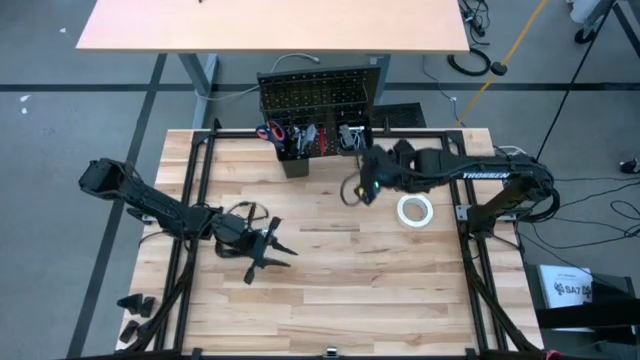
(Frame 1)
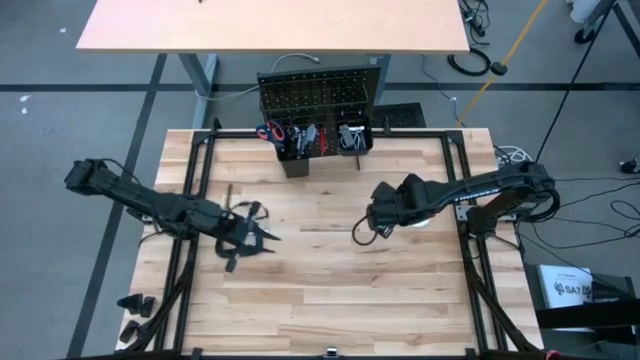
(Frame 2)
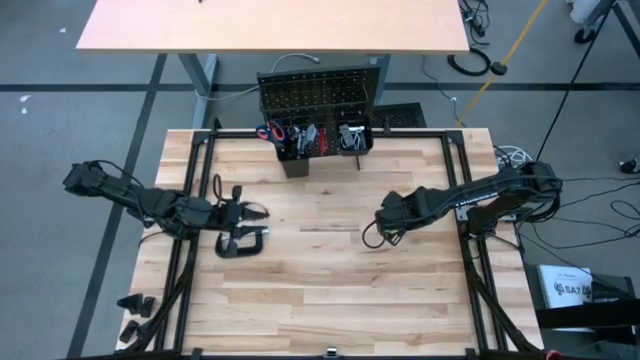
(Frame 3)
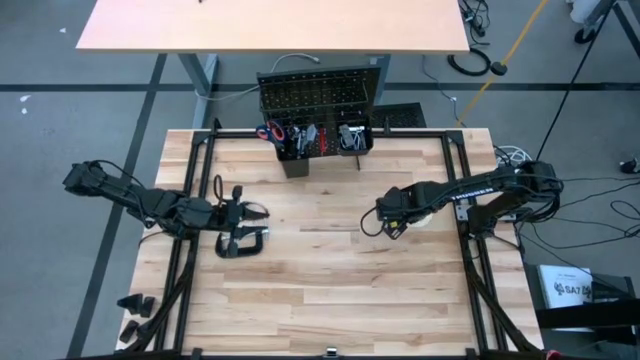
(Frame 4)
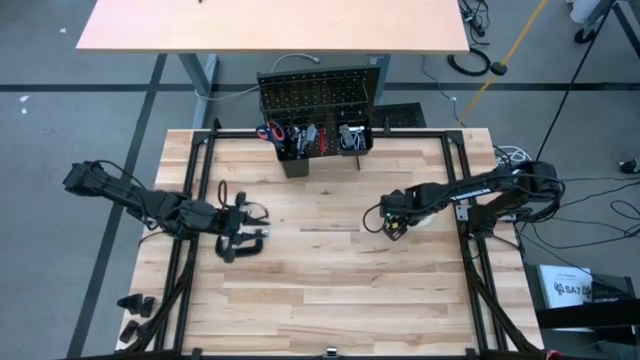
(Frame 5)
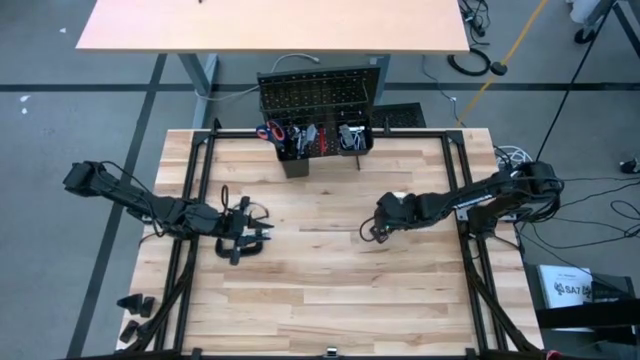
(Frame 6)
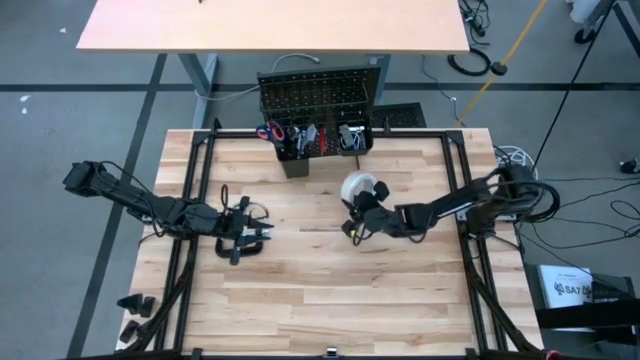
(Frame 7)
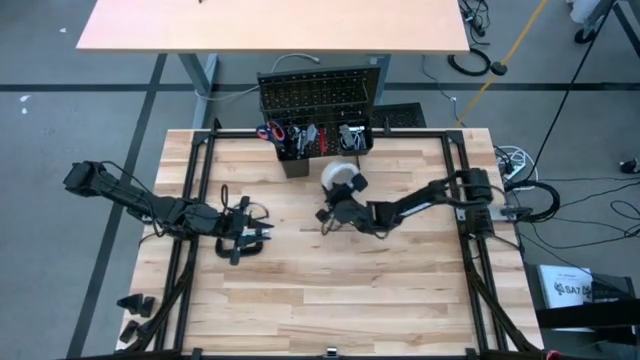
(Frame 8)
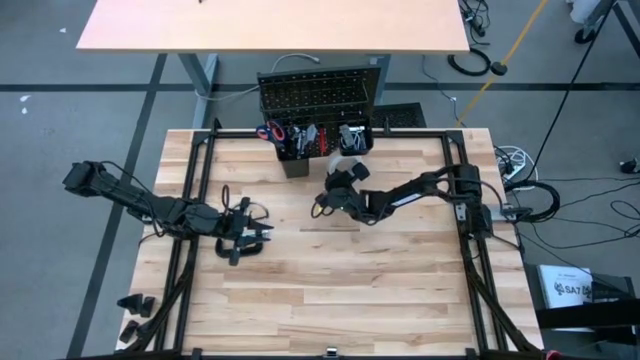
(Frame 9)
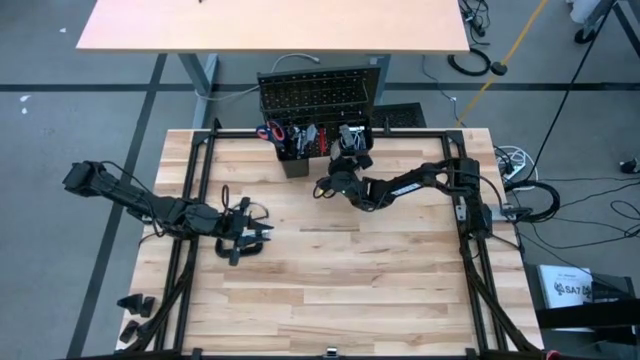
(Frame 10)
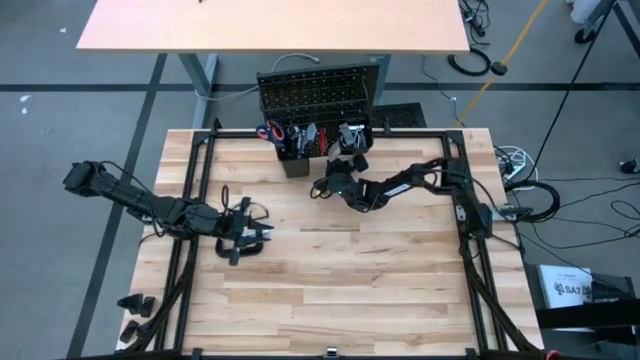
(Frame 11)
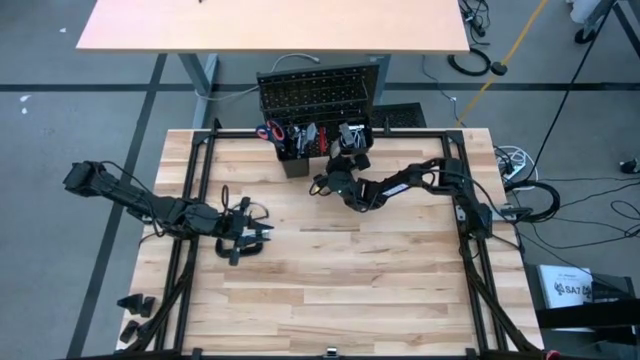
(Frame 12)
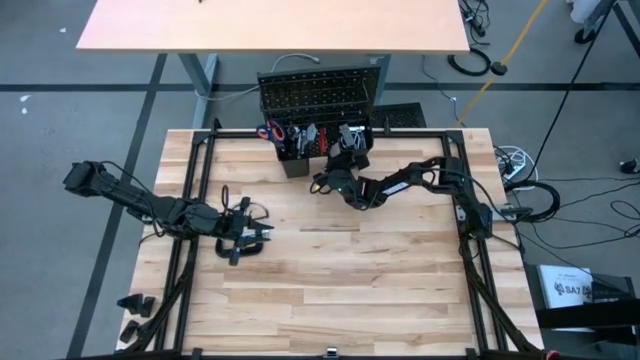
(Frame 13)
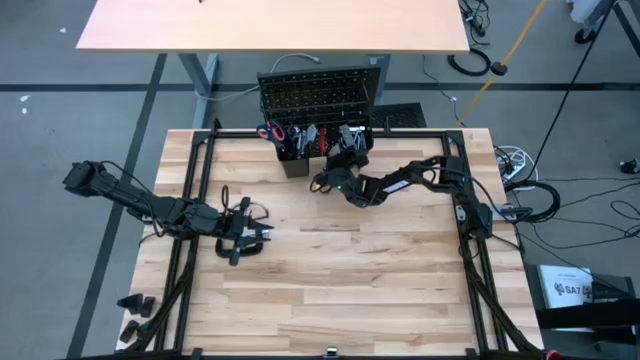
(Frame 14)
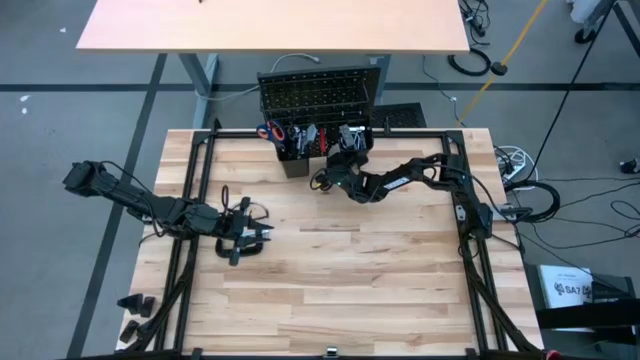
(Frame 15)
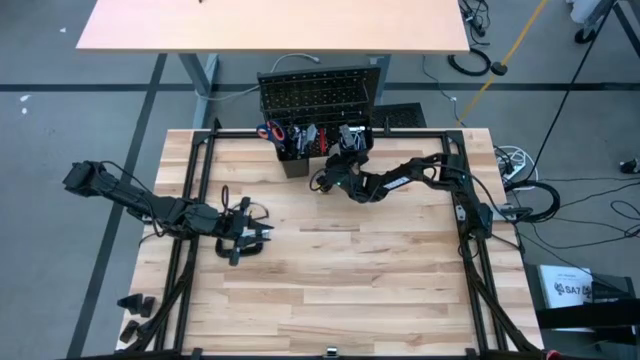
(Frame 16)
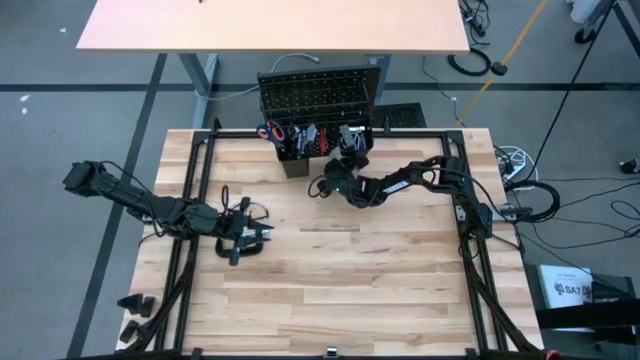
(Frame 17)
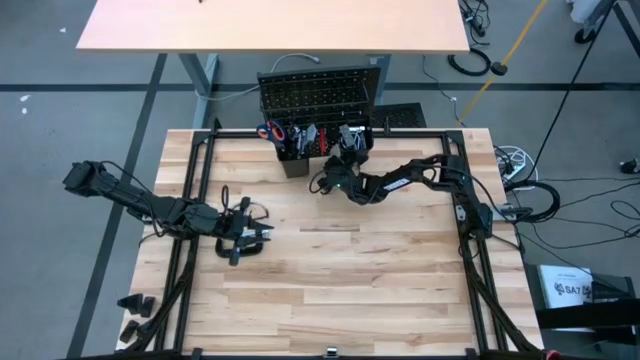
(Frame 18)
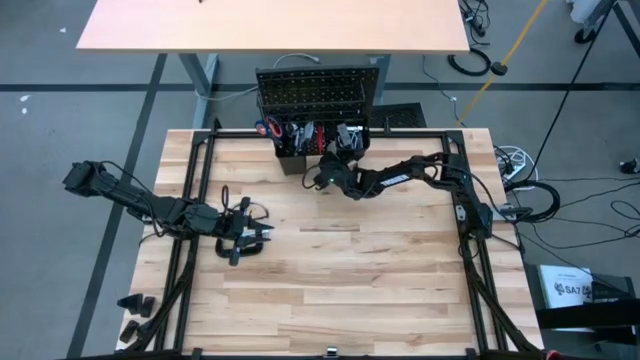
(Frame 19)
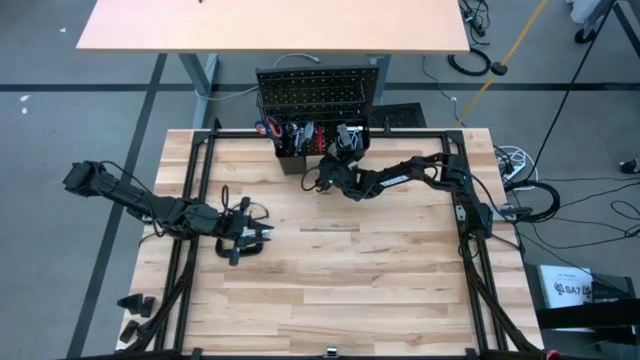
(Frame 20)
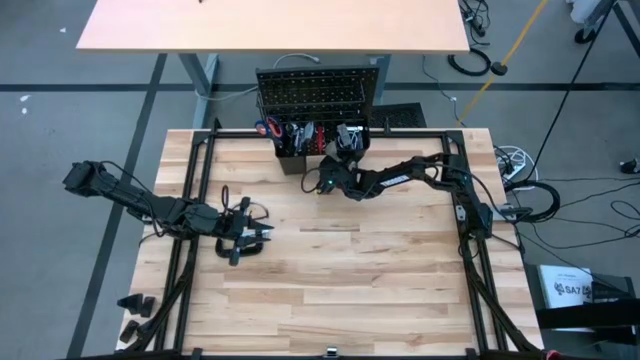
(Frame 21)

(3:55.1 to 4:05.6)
Task: Hang tools onto peg board
Hang the tape on the peg board

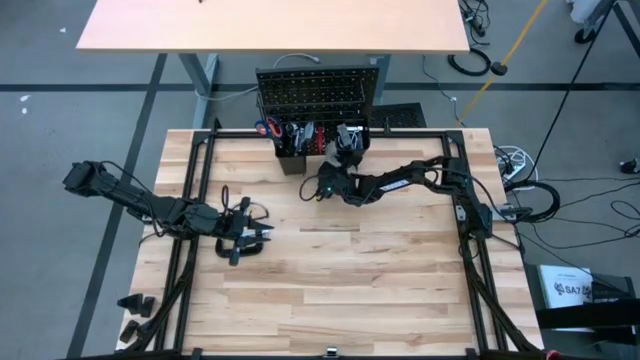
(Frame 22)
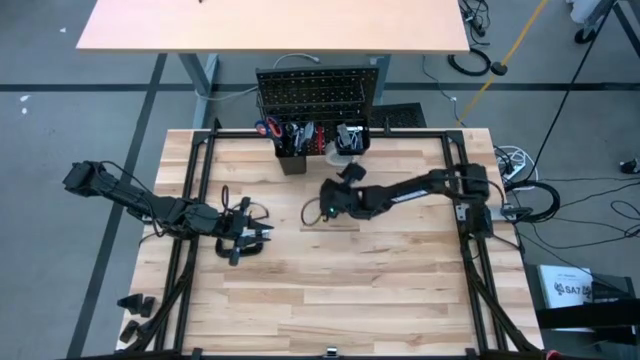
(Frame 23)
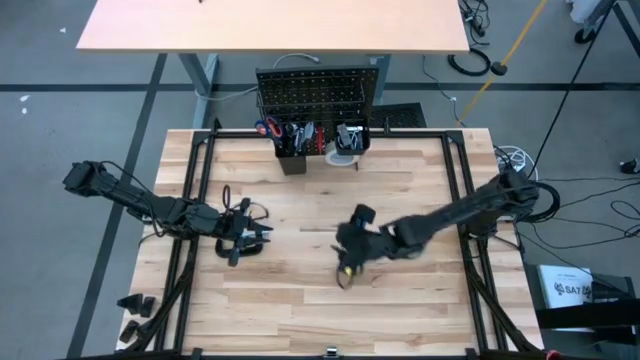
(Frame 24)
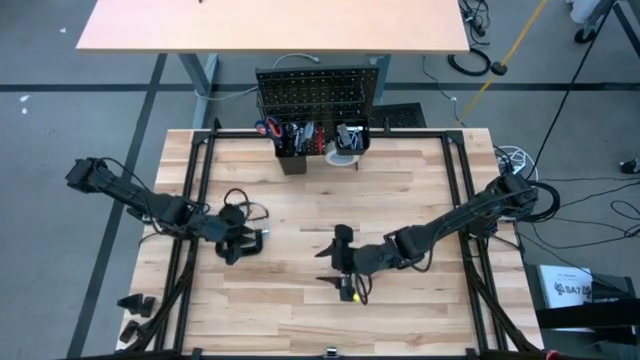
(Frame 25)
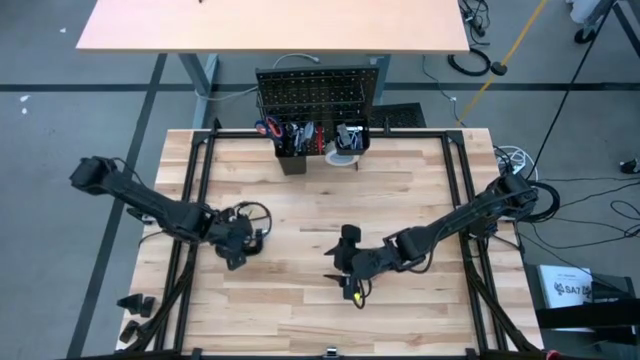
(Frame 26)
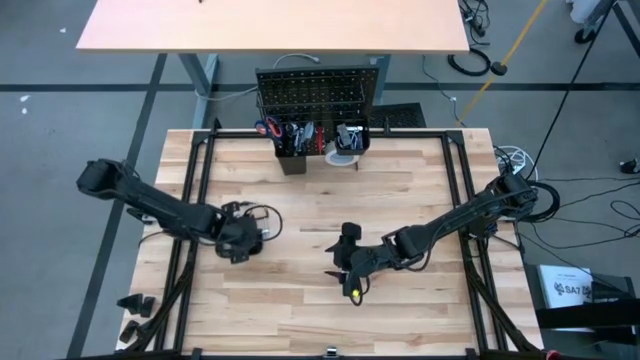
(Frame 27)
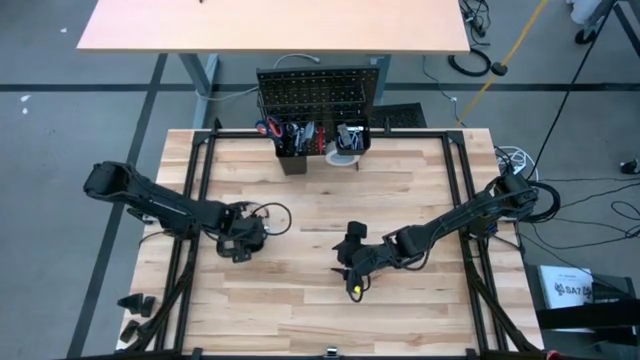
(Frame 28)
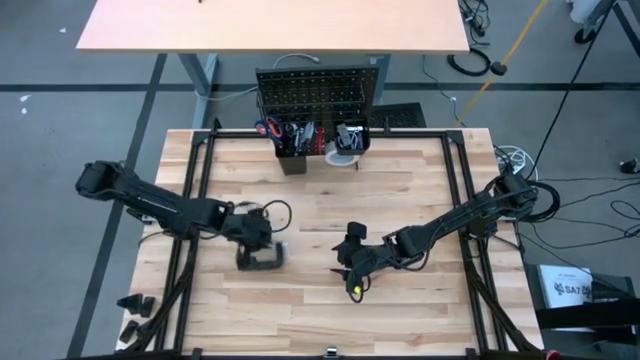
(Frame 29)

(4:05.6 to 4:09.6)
Put the clamp on the black basket on the peg board

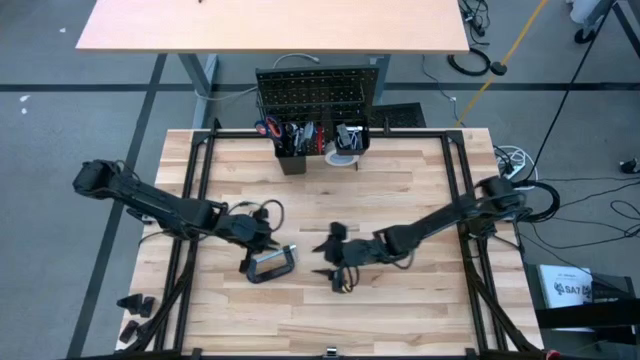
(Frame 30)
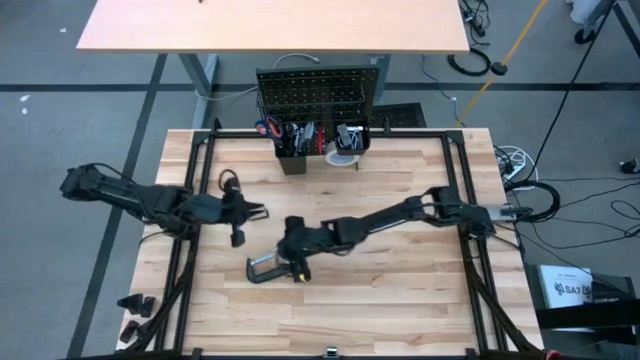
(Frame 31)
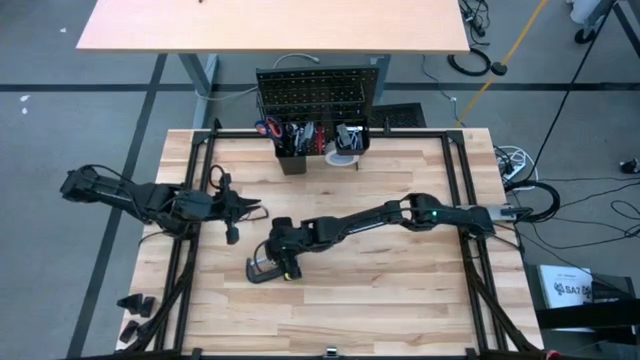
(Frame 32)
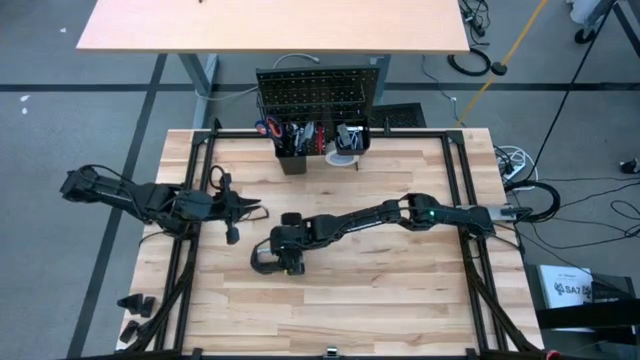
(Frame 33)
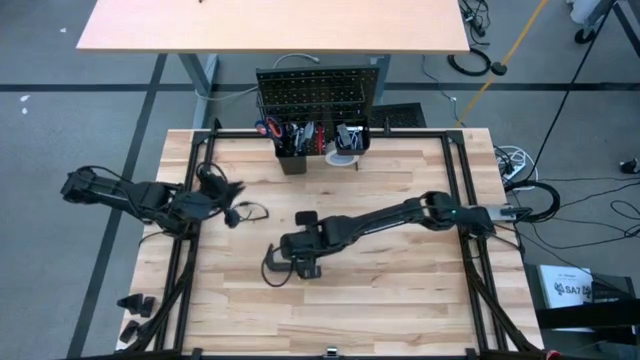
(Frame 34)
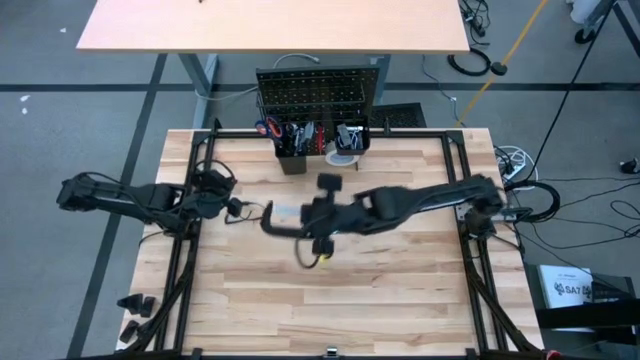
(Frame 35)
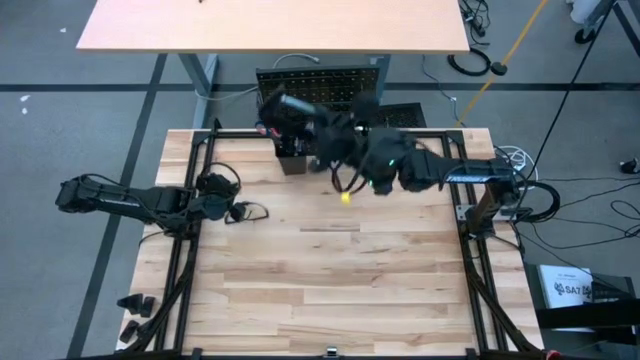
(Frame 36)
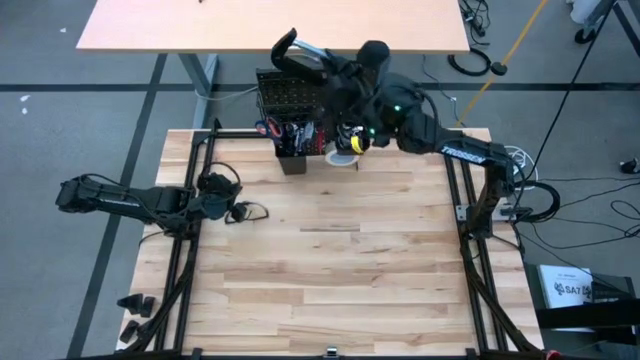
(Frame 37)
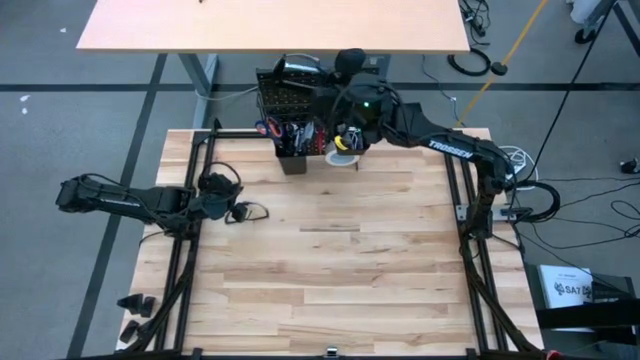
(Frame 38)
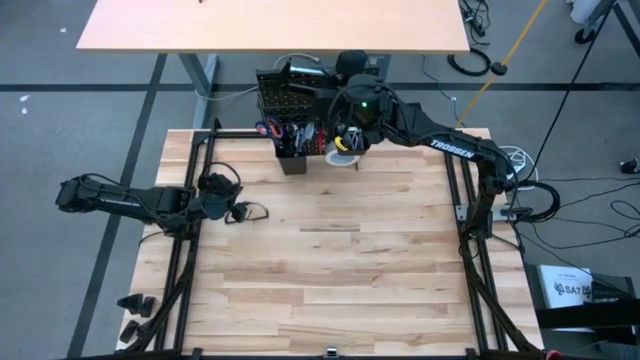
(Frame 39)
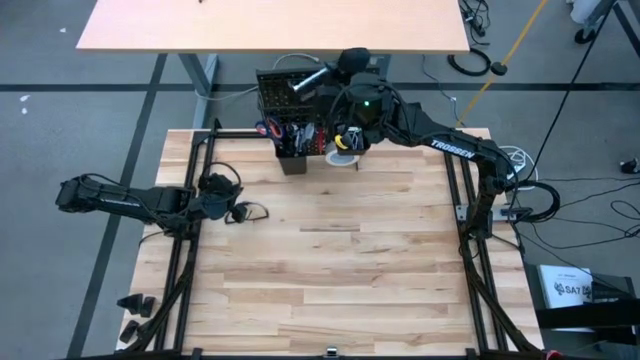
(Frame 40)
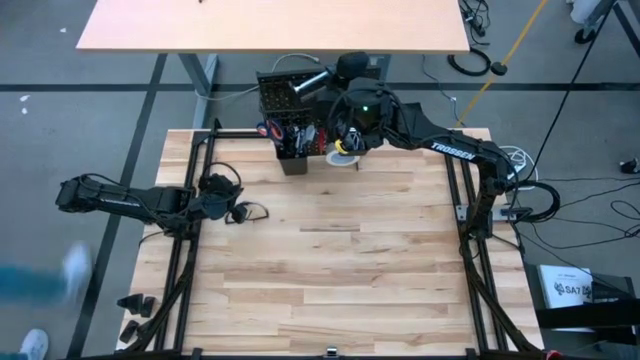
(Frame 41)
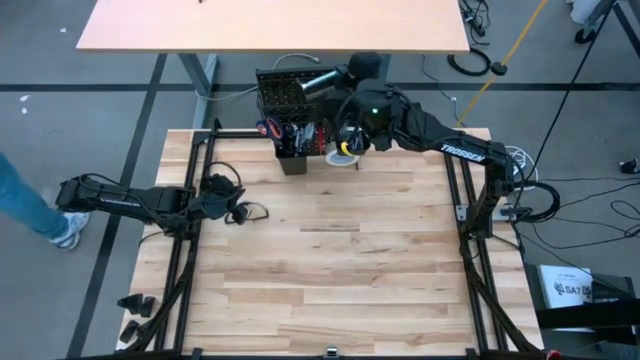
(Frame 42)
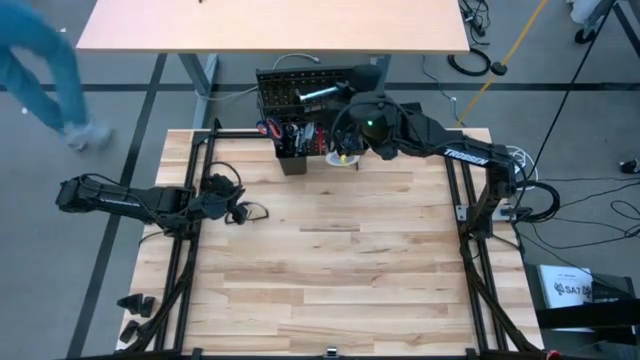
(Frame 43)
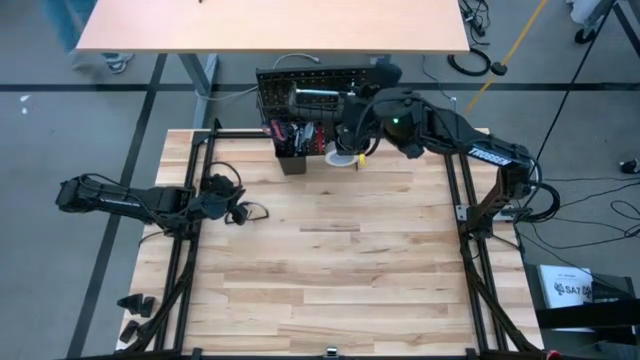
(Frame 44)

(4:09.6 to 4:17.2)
Put the clamp on the black basket on the peg board
